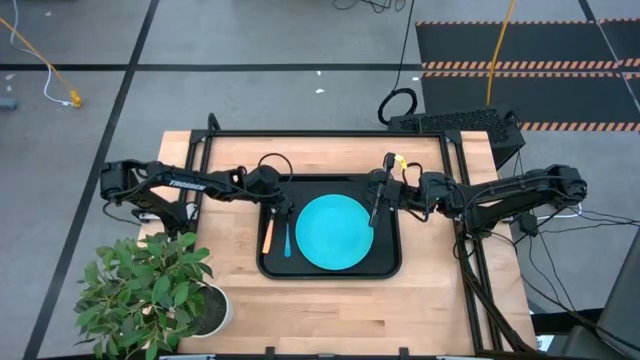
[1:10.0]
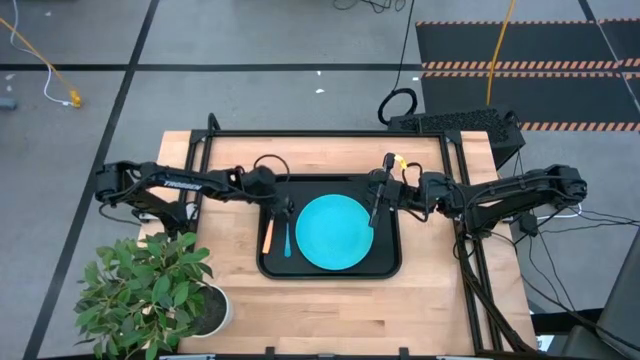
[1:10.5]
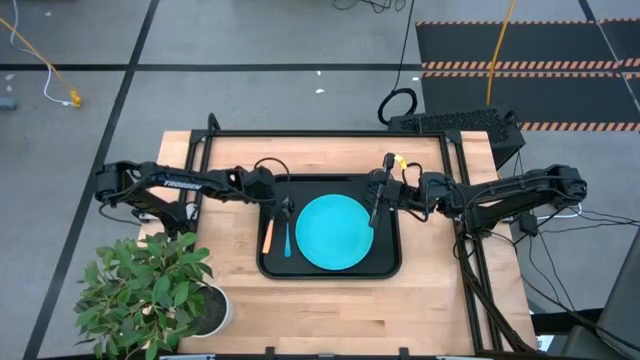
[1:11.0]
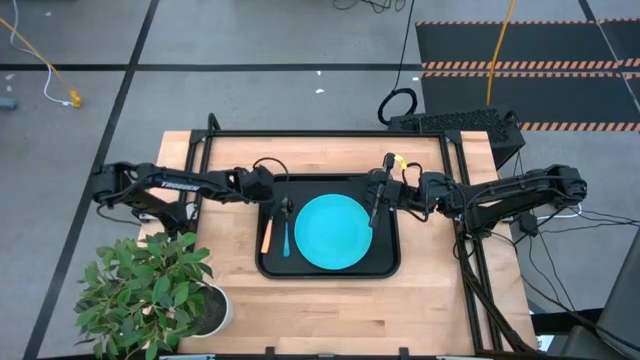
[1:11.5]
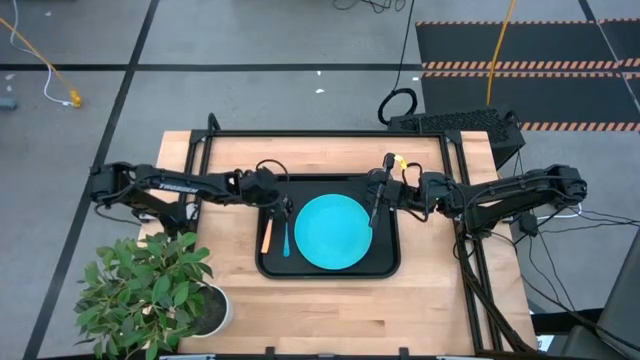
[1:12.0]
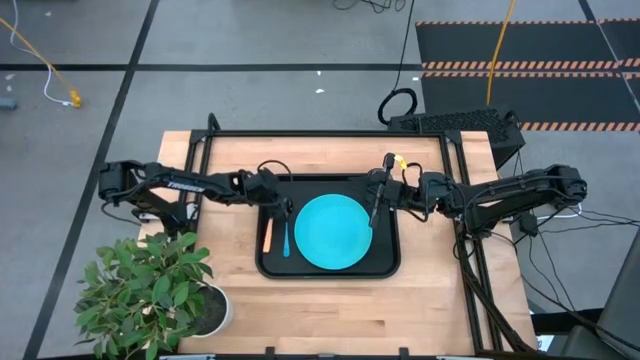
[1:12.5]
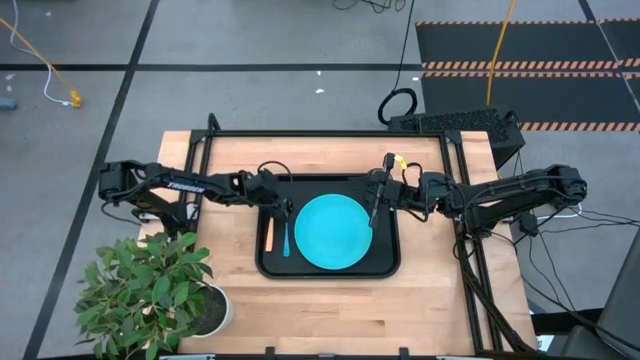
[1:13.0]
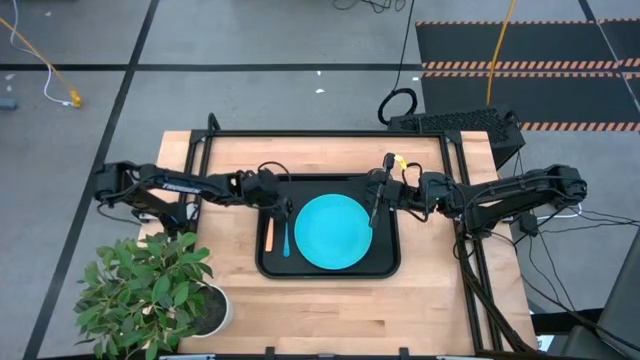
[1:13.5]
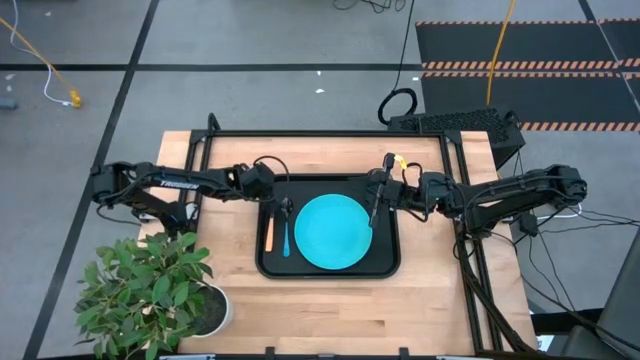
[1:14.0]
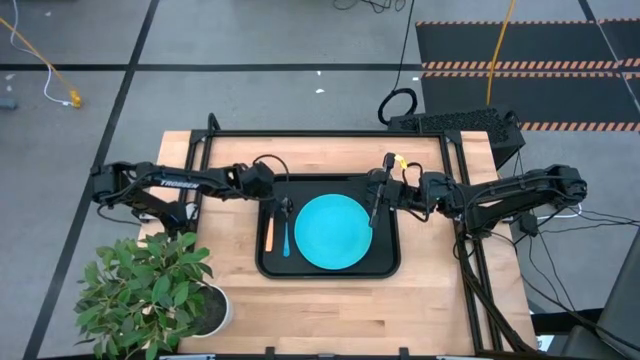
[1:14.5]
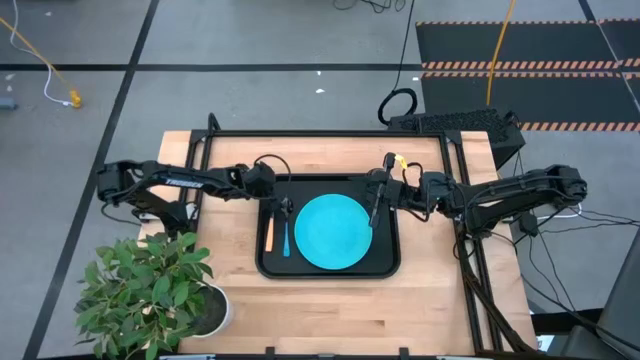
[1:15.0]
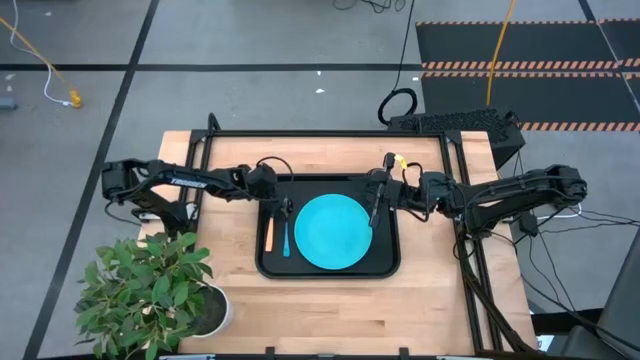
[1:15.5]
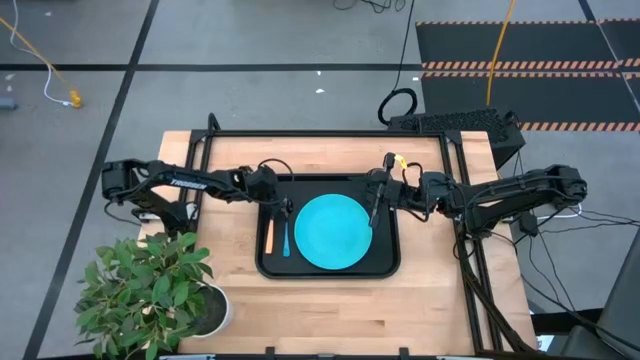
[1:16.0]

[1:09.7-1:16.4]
Task: Pick and place plate/cup/fork/spoon on tray
Adjust the orange fork on the black serving tray

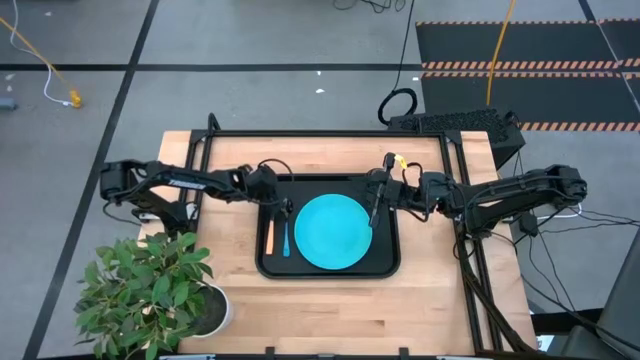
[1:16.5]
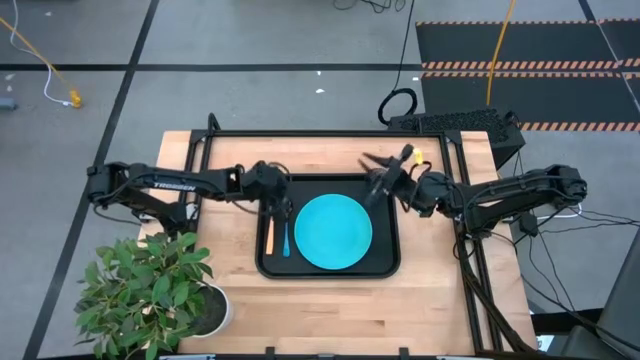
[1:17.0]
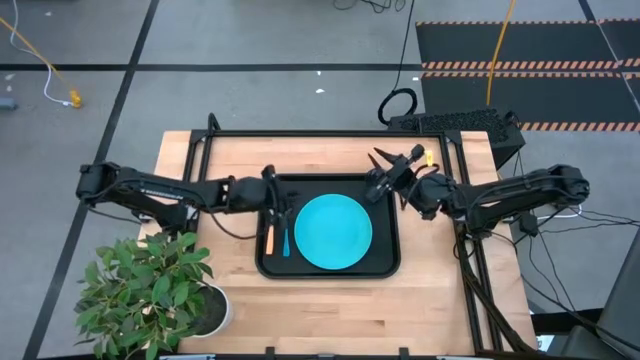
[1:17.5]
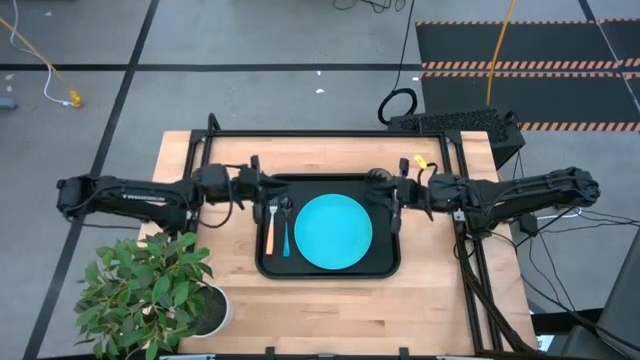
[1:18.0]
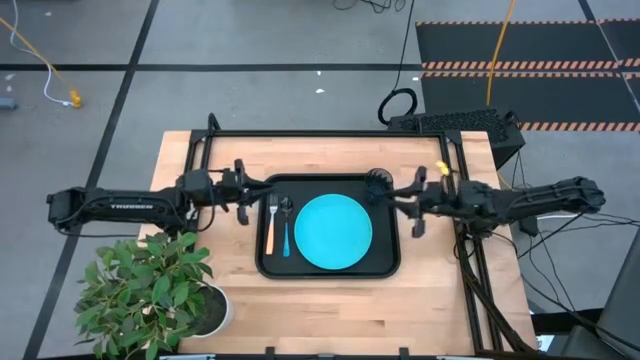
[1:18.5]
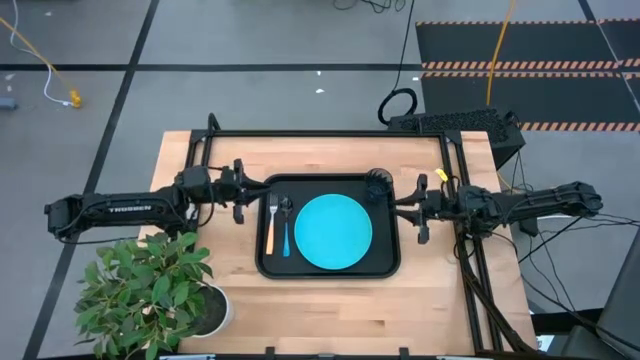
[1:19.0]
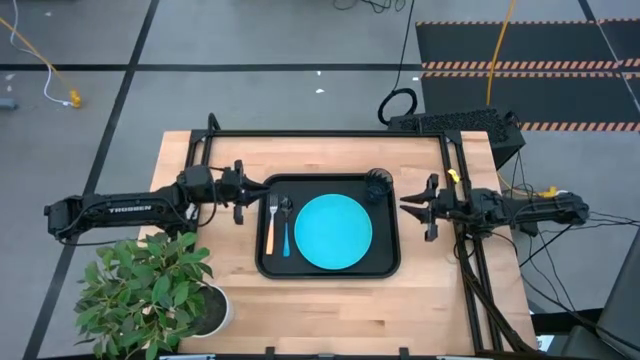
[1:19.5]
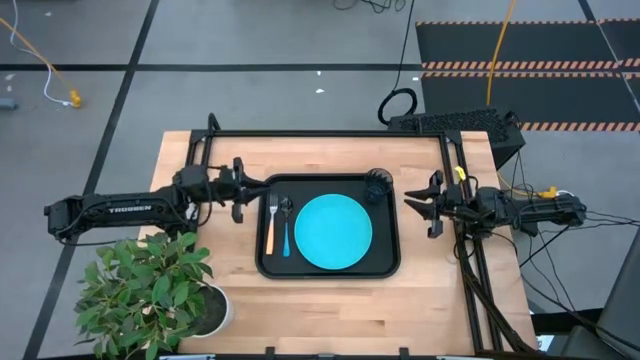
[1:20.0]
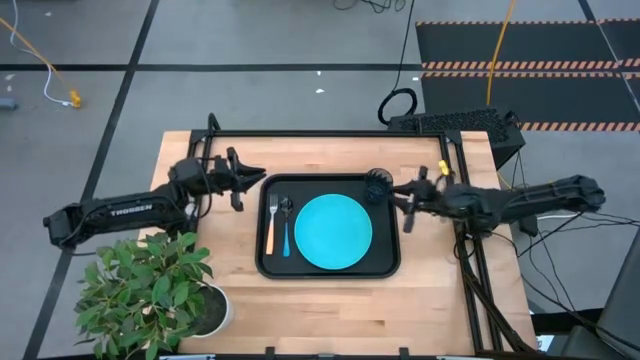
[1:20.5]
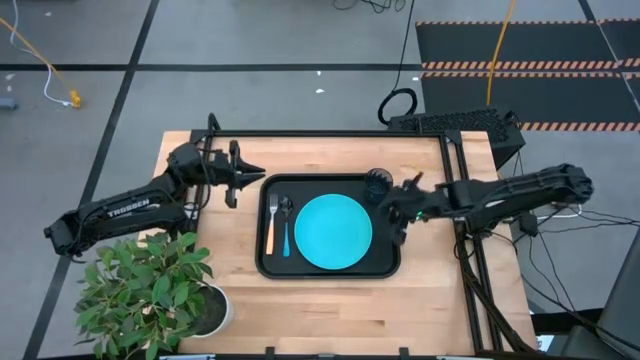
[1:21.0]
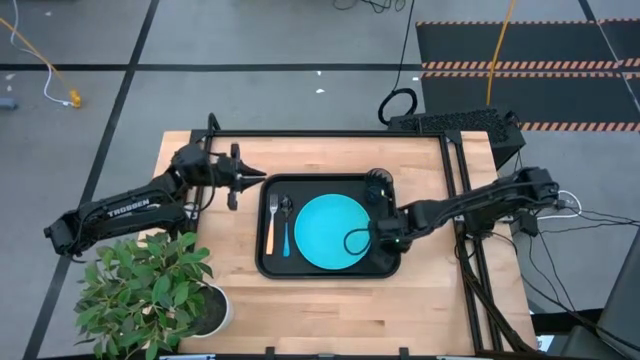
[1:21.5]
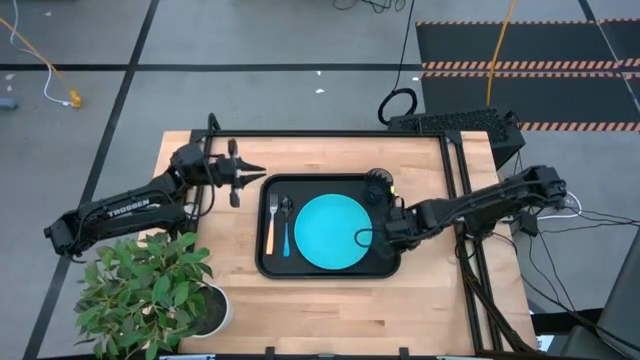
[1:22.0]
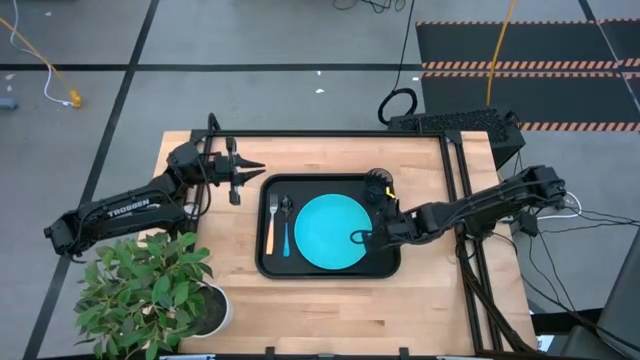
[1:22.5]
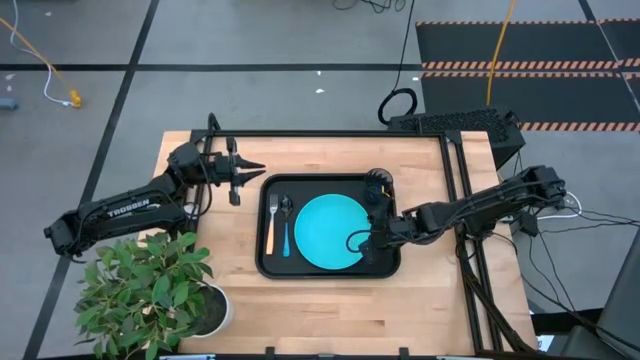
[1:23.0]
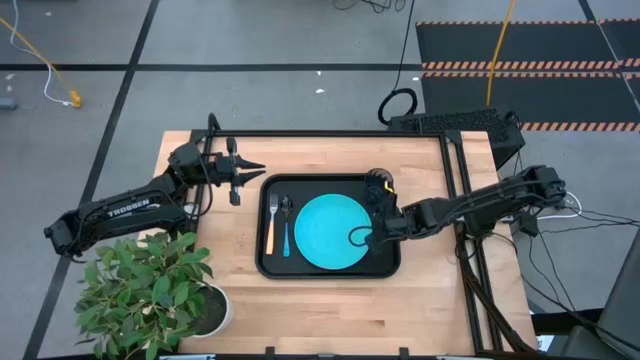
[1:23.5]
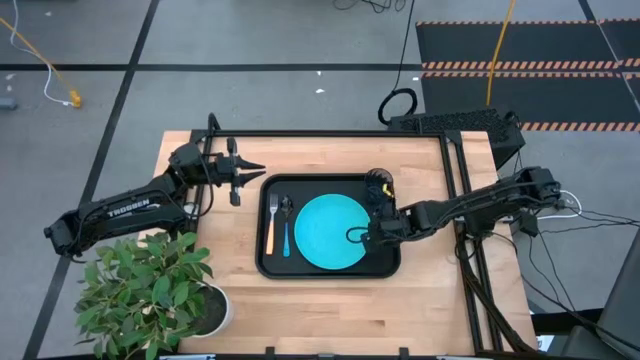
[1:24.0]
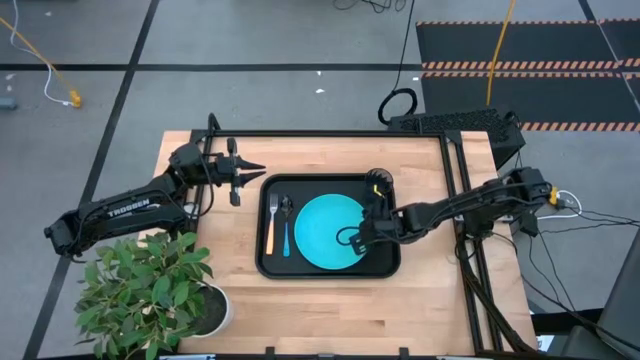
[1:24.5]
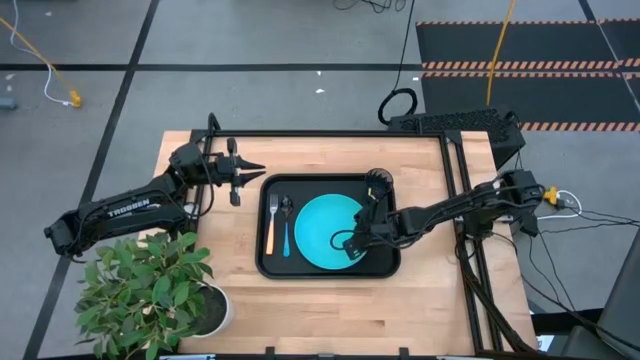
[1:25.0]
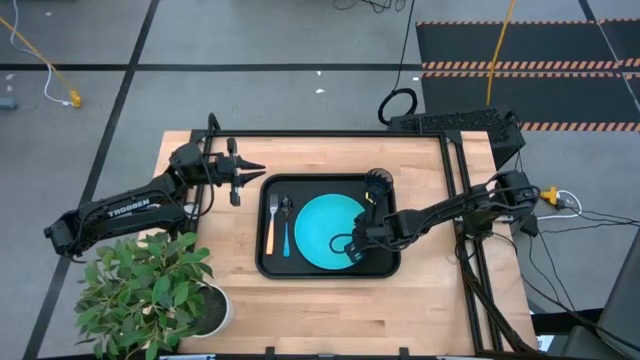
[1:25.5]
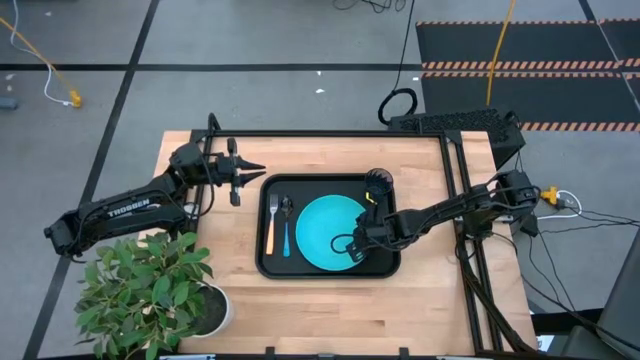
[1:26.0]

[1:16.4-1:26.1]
Adjust the blue plate on the black serving tray

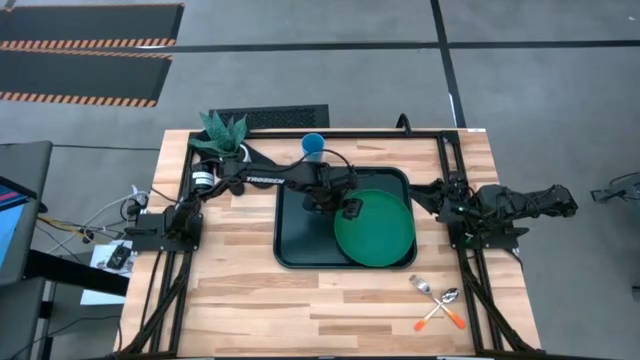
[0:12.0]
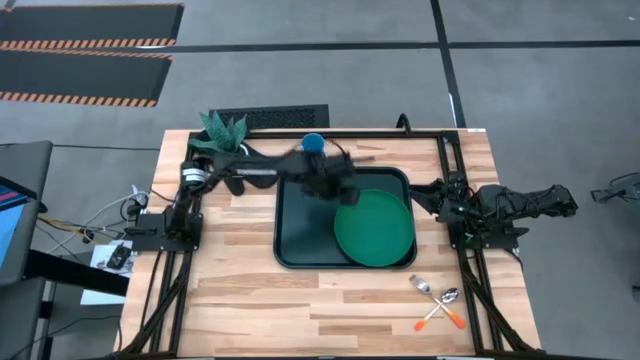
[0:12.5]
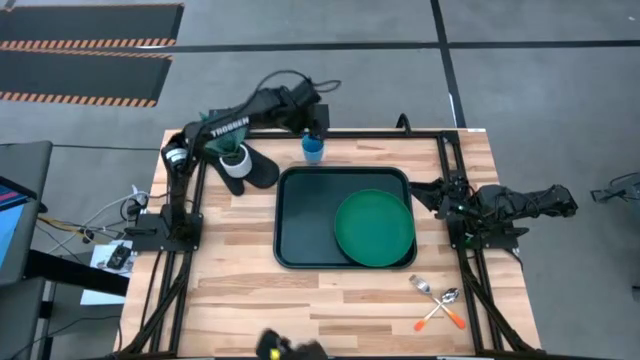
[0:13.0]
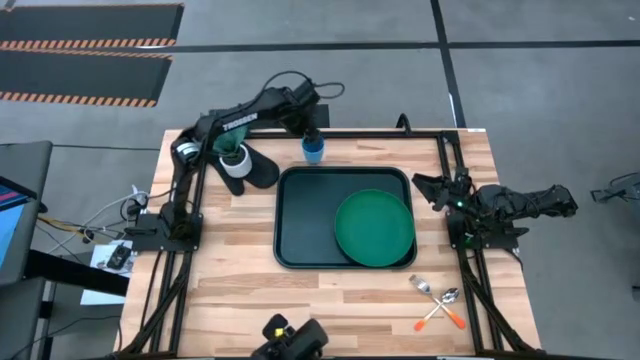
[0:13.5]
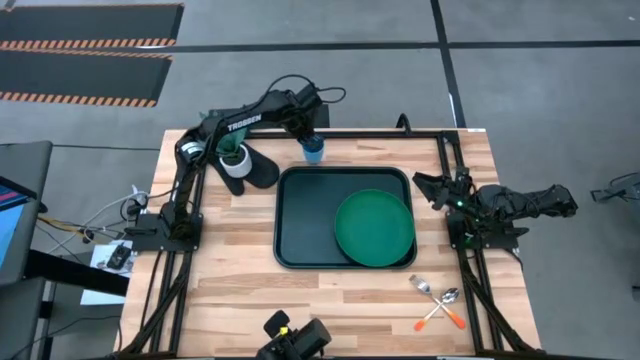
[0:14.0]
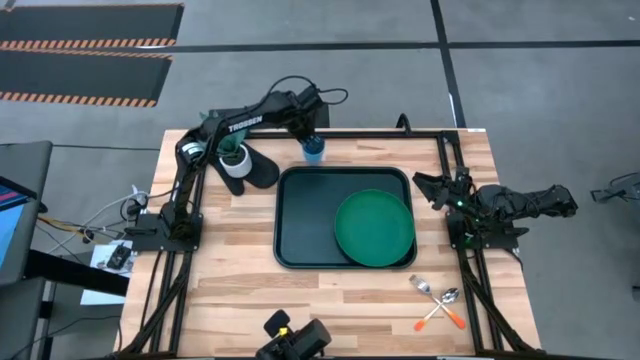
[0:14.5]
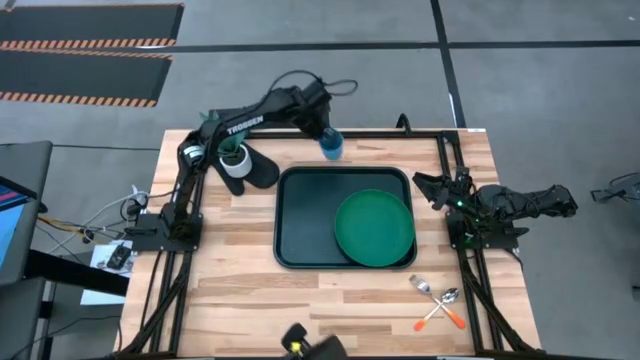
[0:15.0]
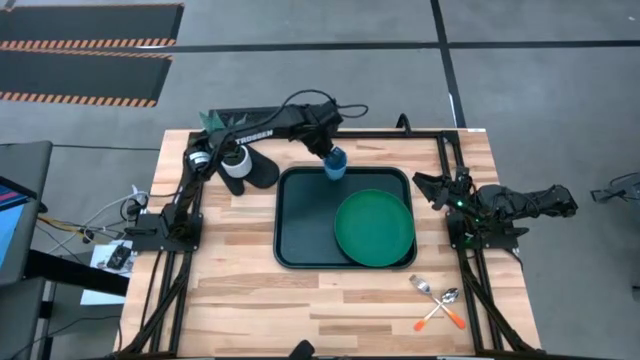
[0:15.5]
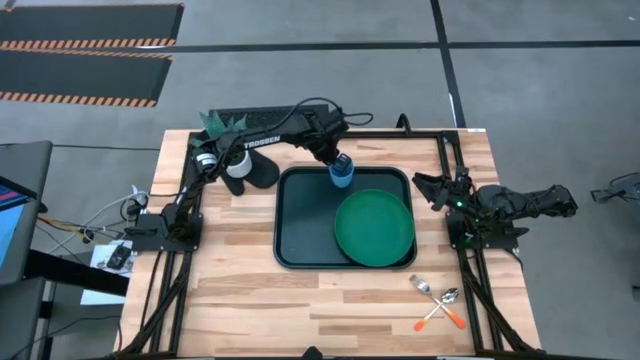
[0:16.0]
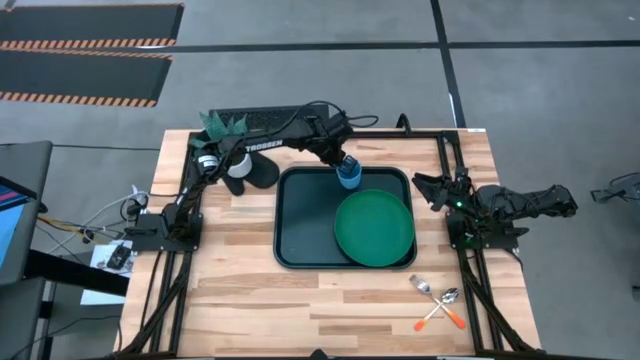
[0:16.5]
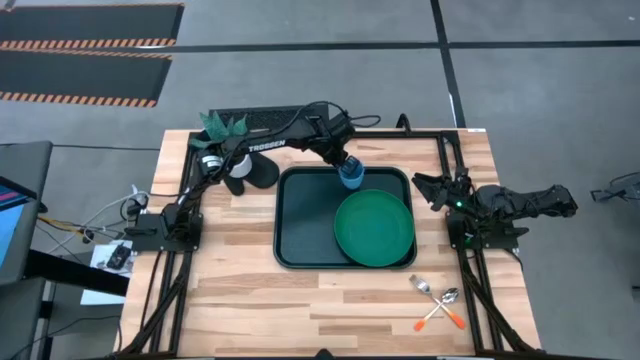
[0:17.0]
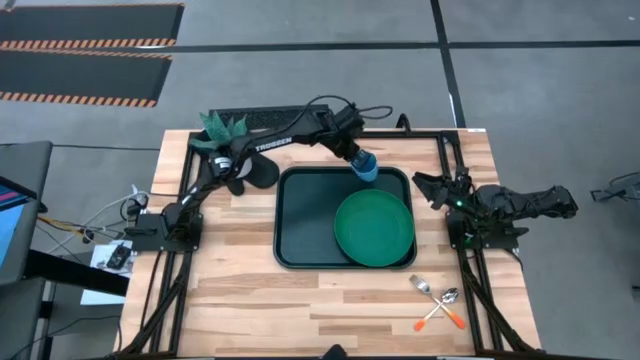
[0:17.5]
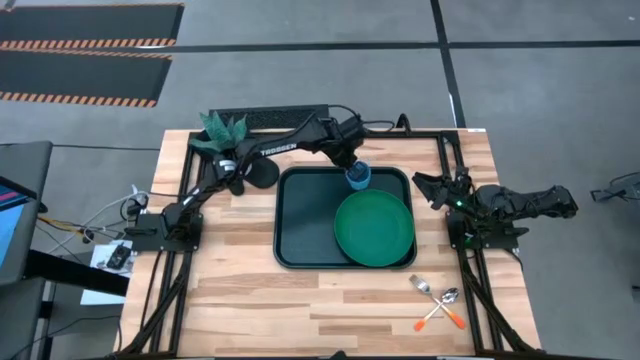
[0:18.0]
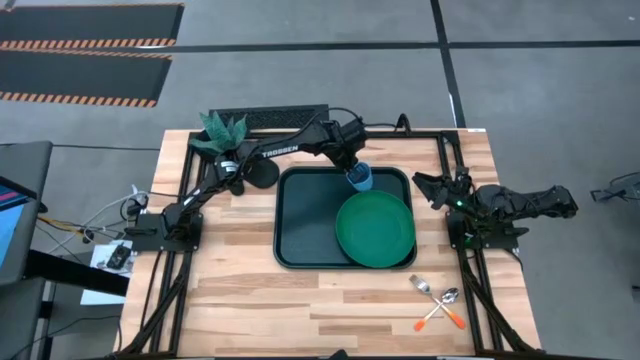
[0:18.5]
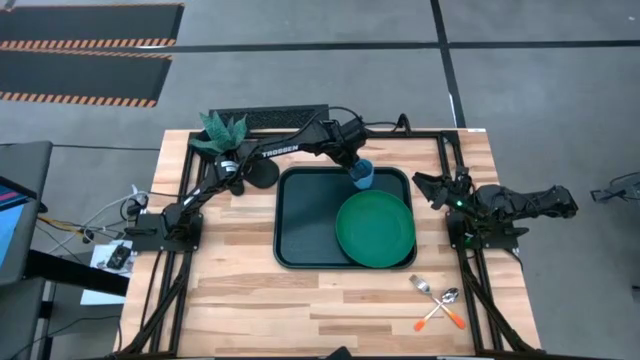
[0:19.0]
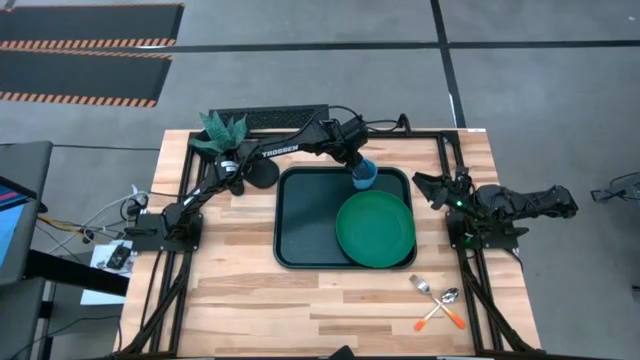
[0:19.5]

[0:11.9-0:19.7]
Task: Pick and place plate/cup/fork/spoon on tray
Put the blue cup on the dark green serving tray above the green plate
